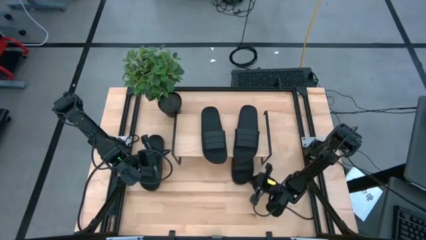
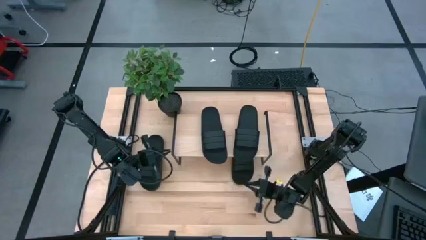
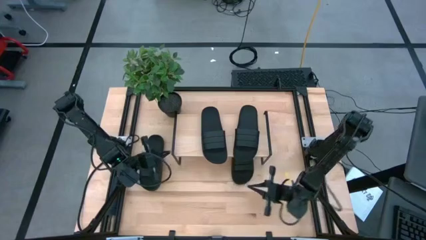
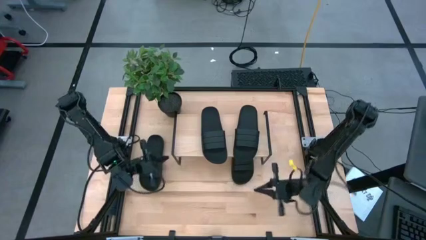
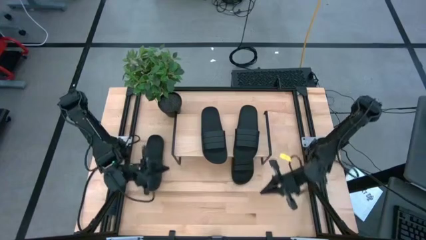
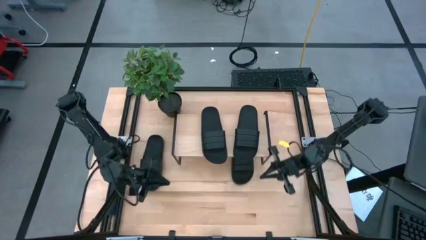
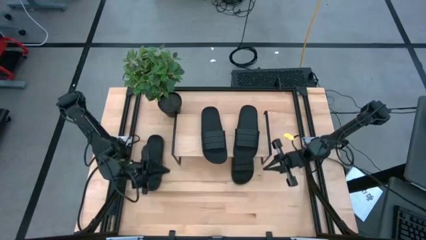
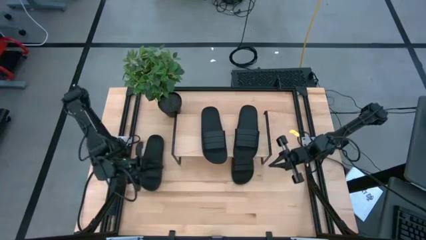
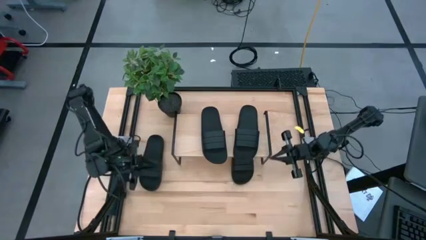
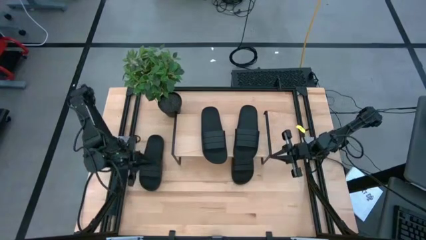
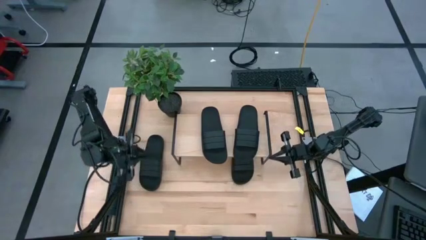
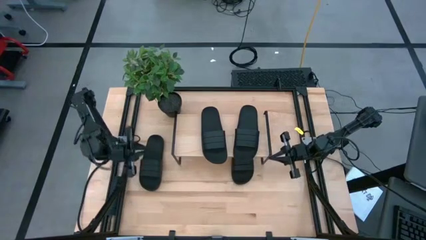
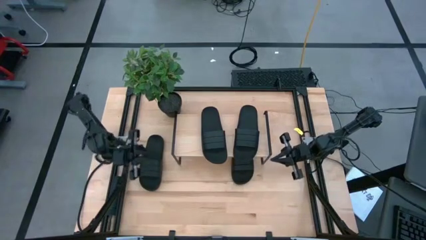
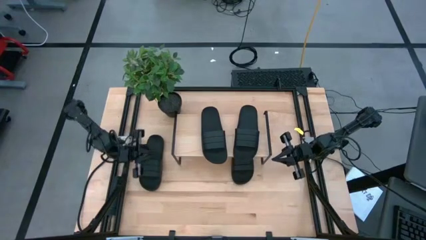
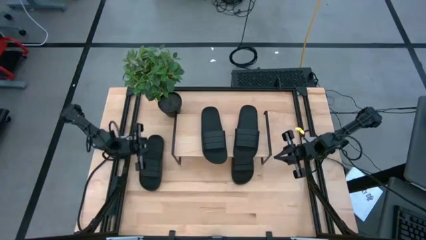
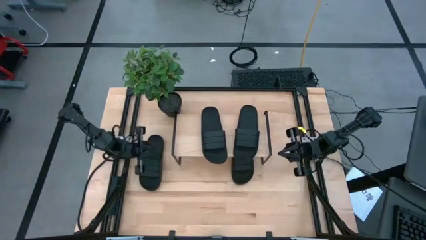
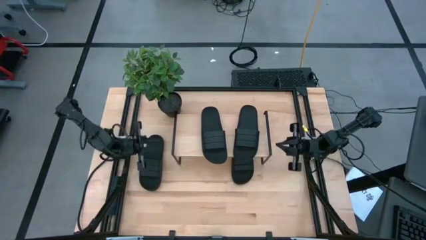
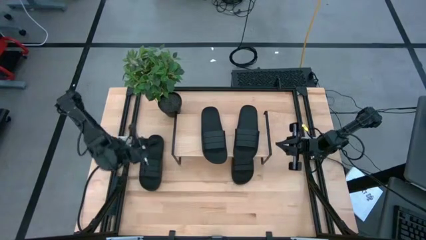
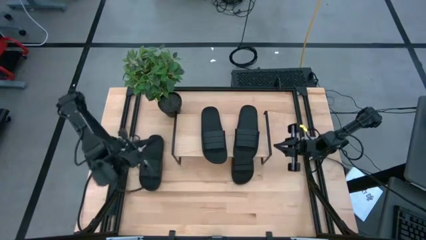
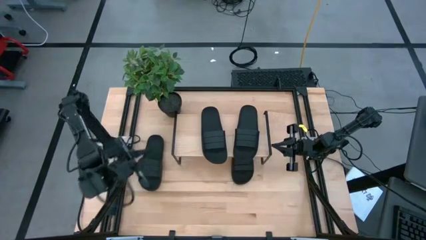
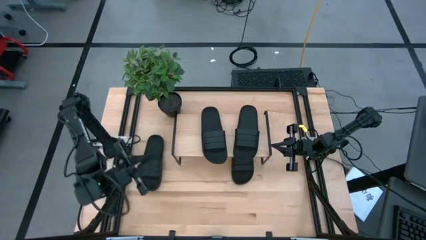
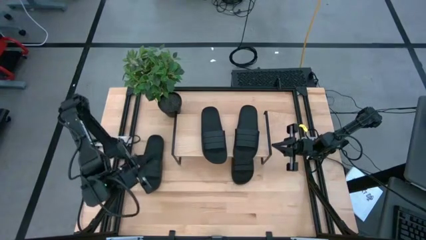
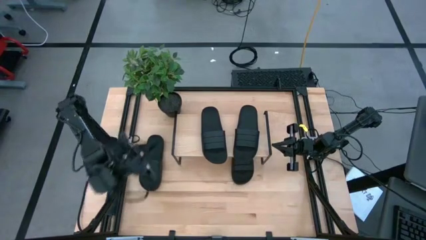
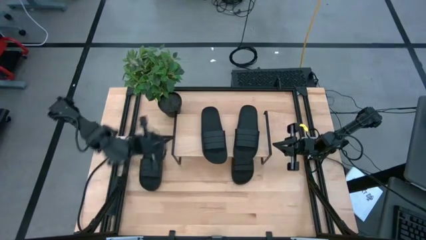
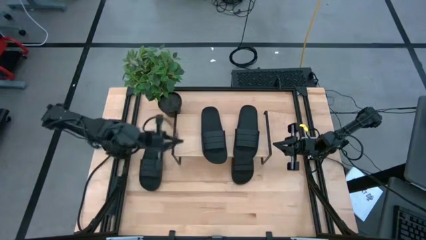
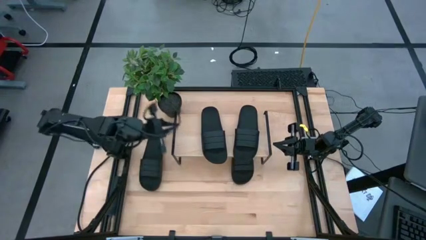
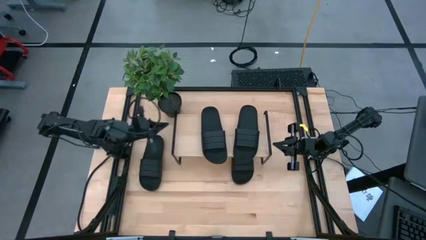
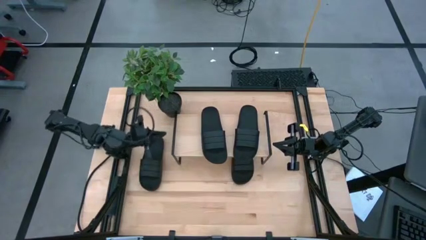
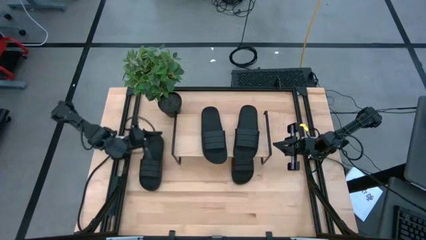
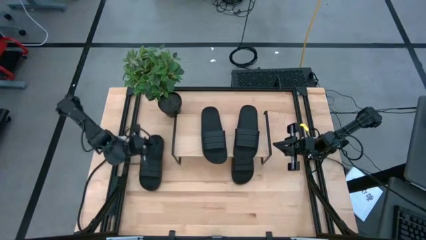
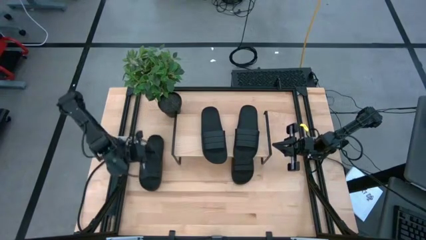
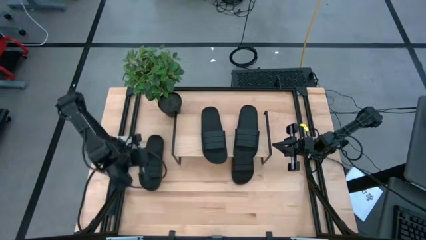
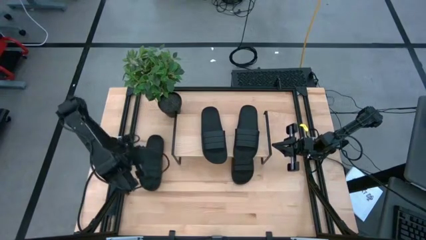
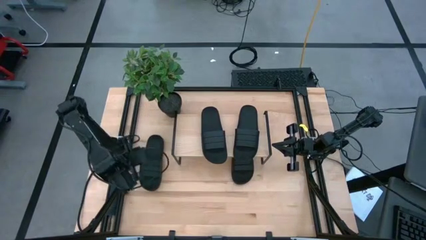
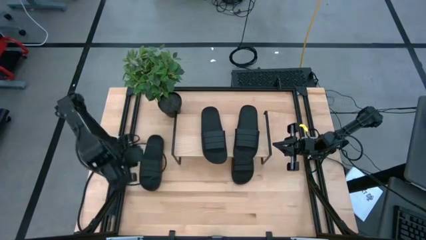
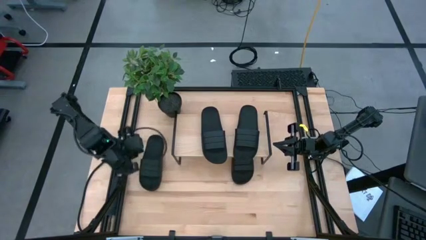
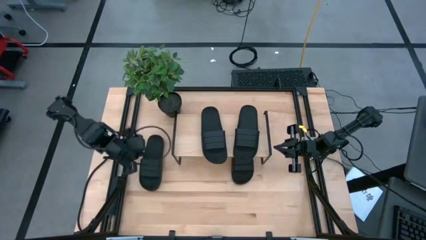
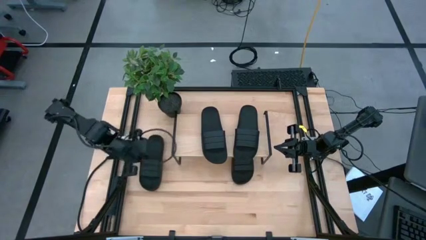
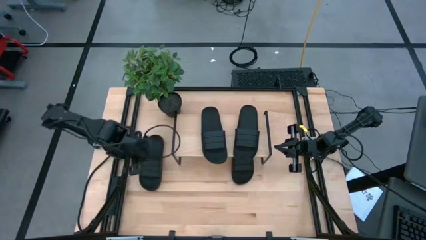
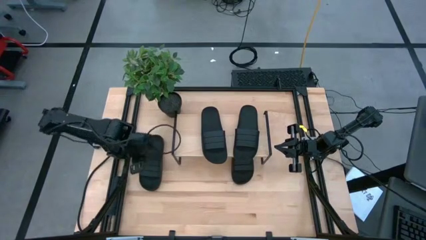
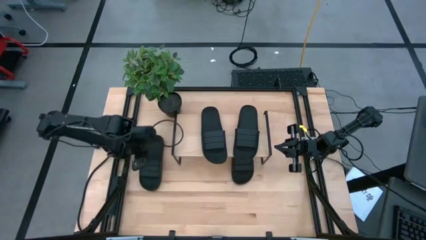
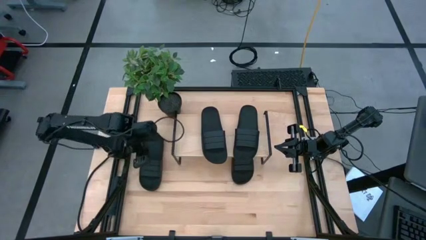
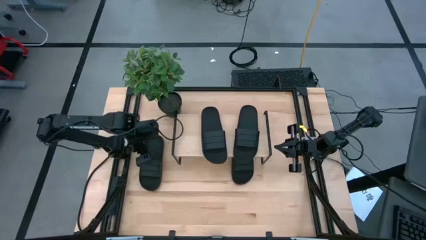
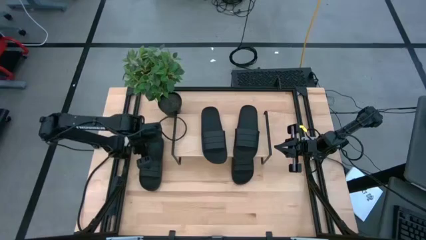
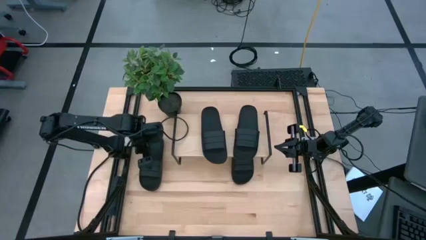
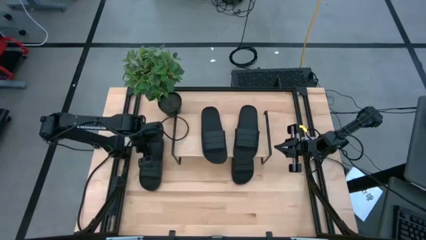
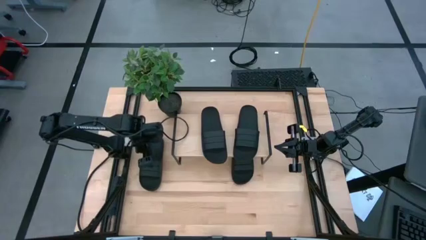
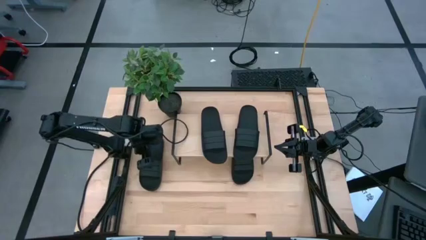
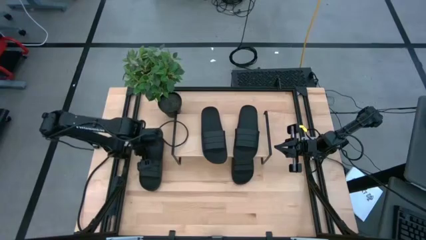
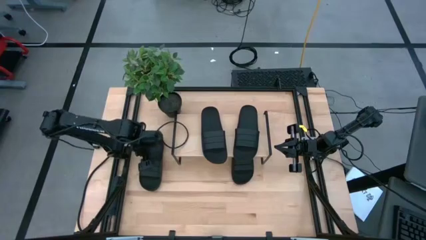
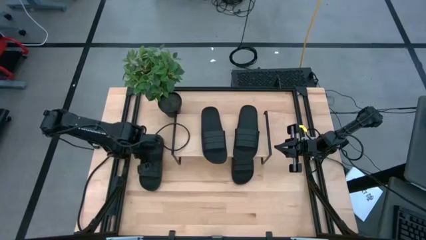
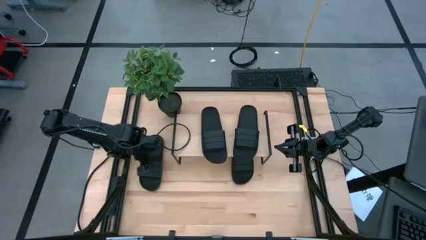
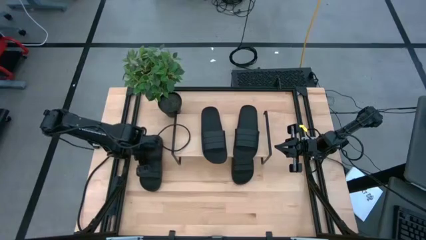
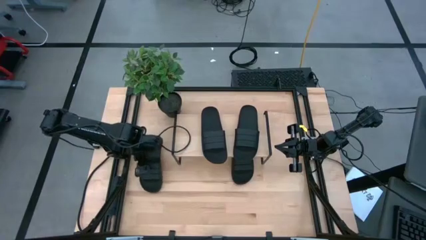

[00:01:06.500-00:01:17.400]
Task: Pick and place slides into the shelf
Put the black slide under the shelf

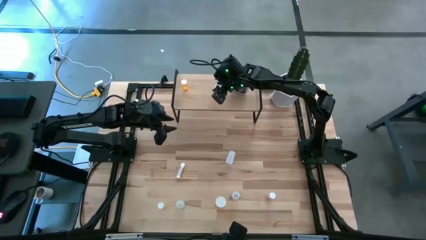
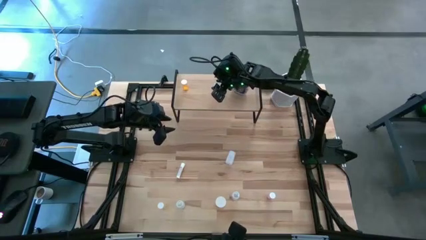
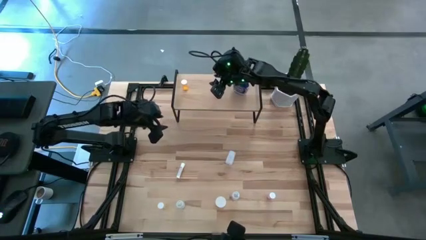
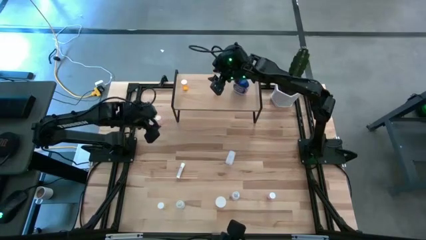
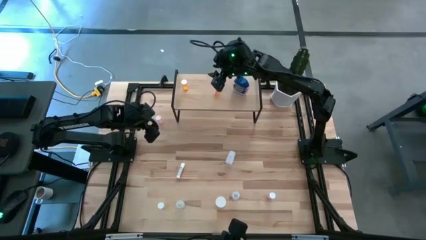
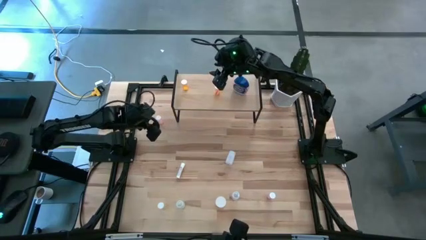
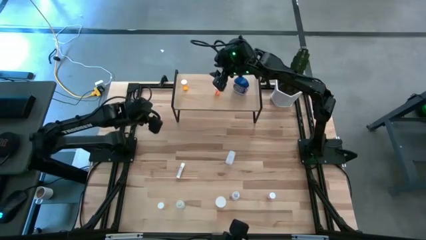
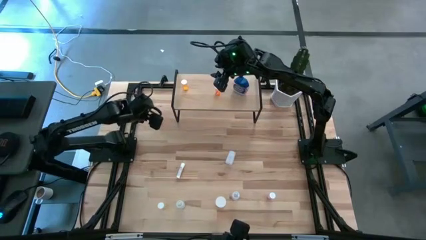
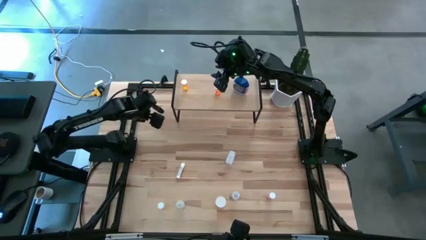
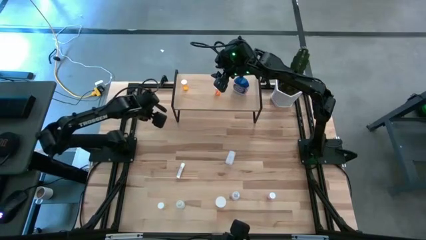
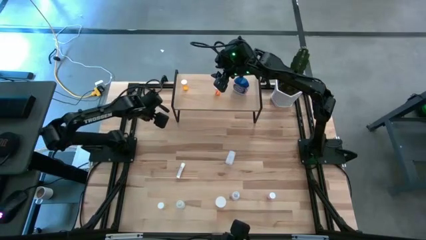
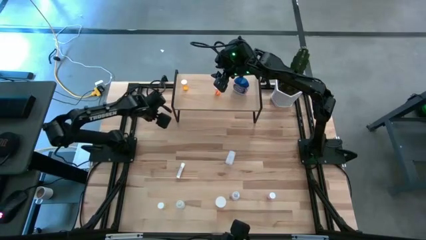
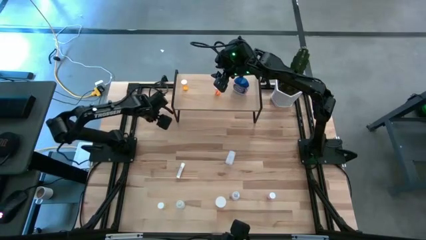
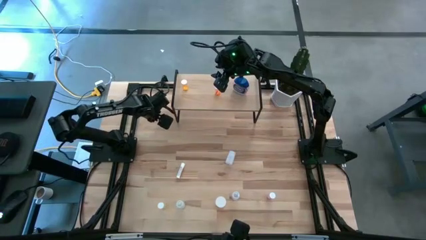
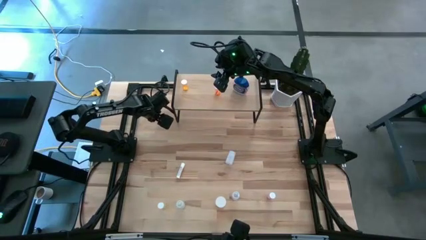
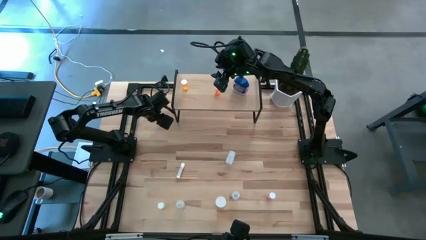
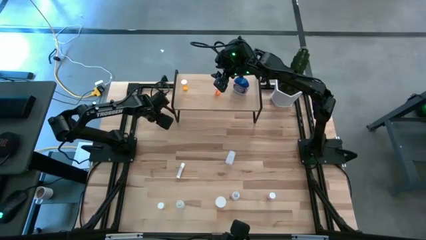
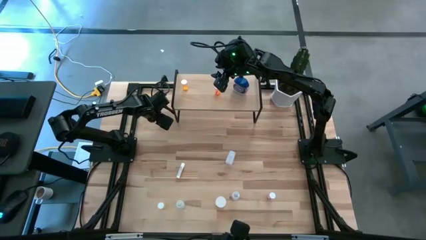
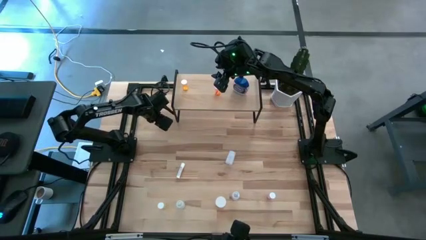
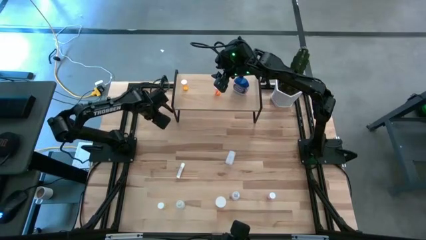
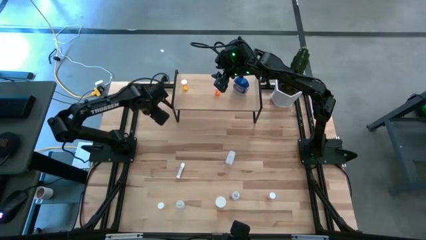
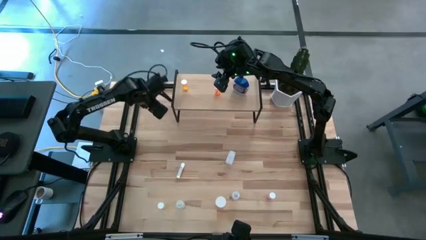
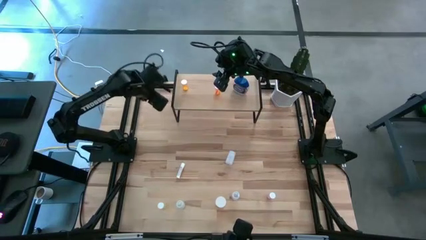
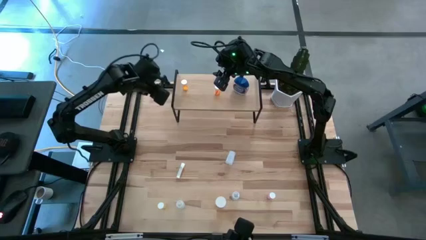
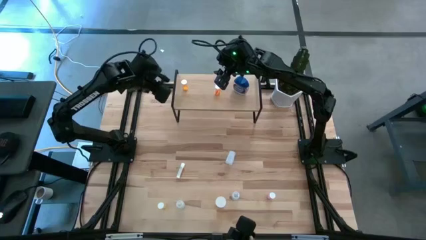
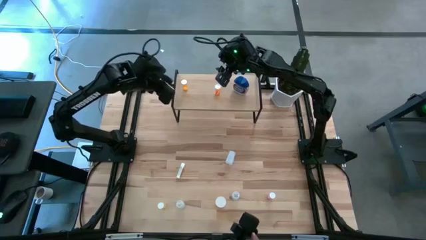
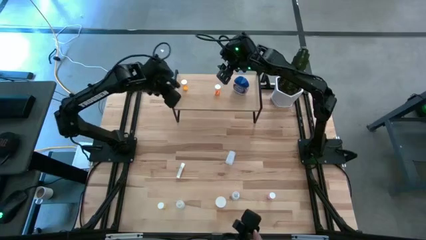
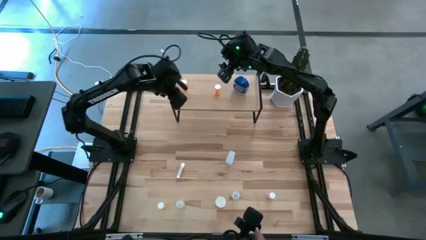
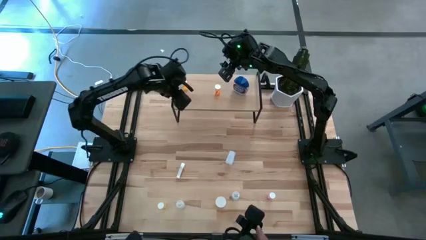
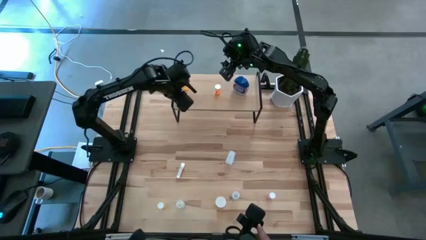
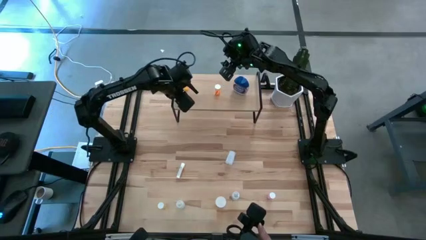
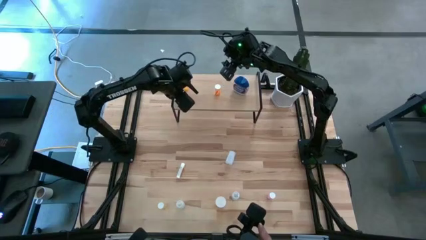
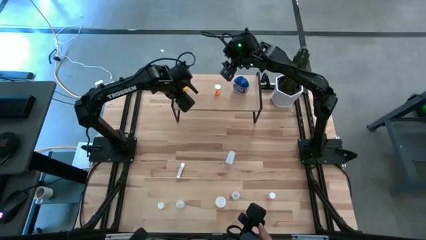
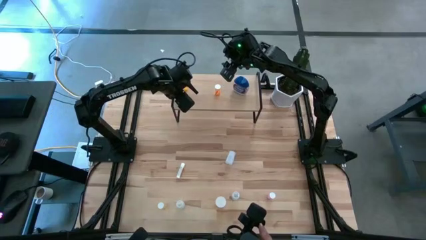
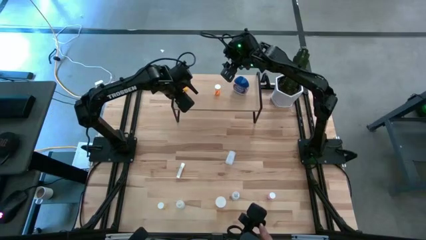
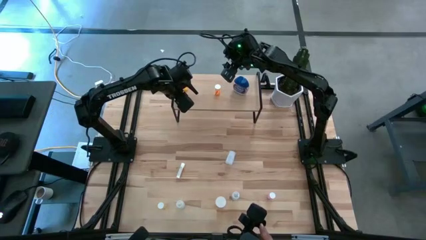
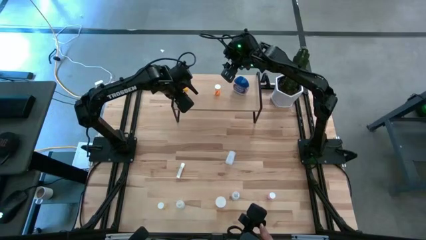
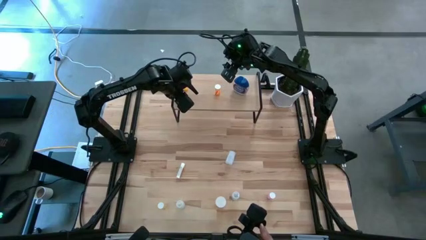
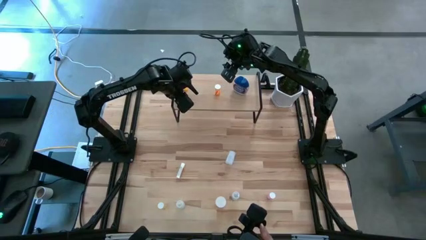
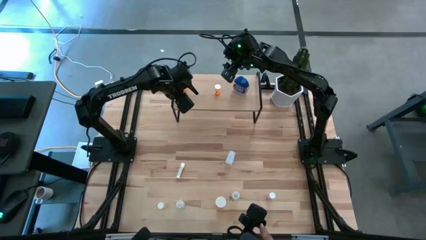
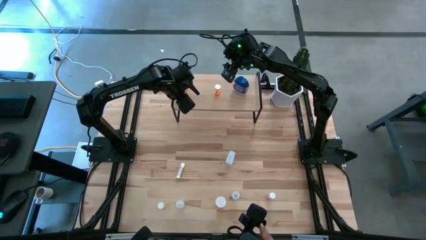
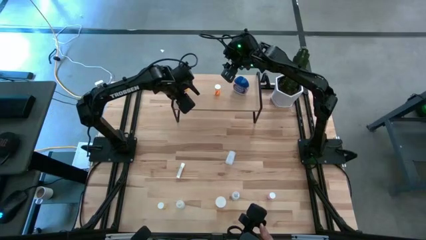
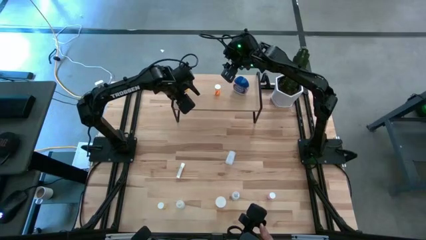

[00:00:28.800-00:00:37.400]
Task: Pick and place medicine bottles onto shelf by color
Put the red pill bottle on the shelf
